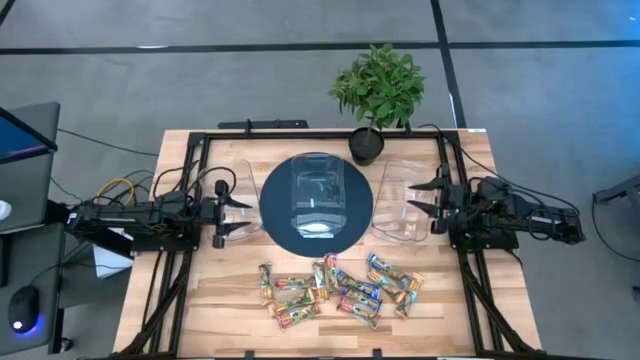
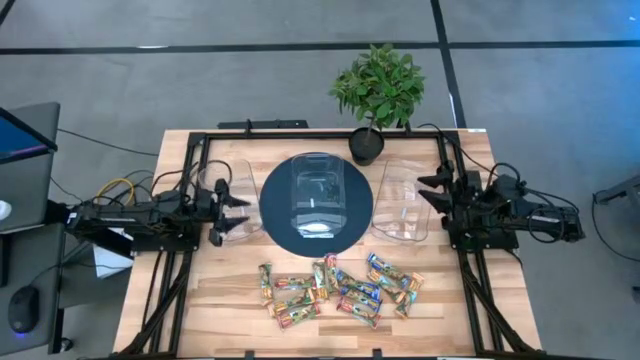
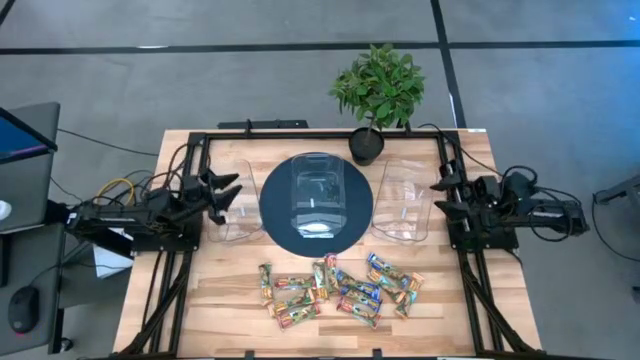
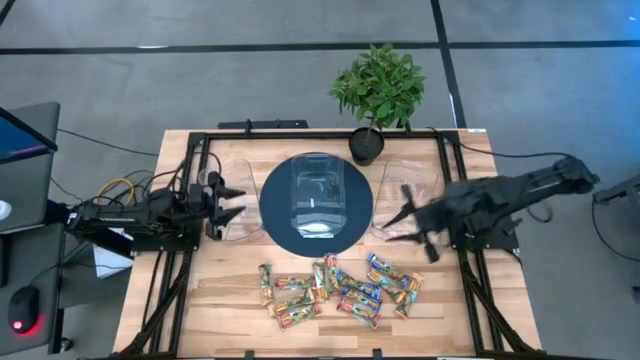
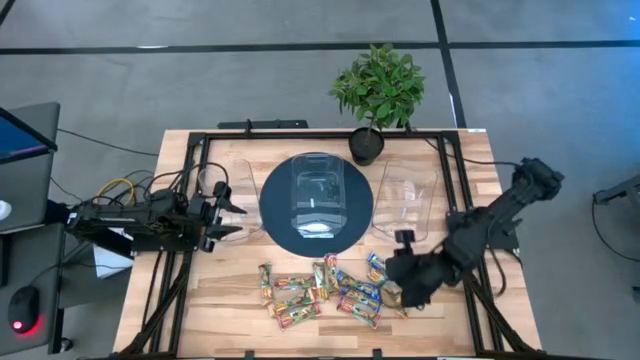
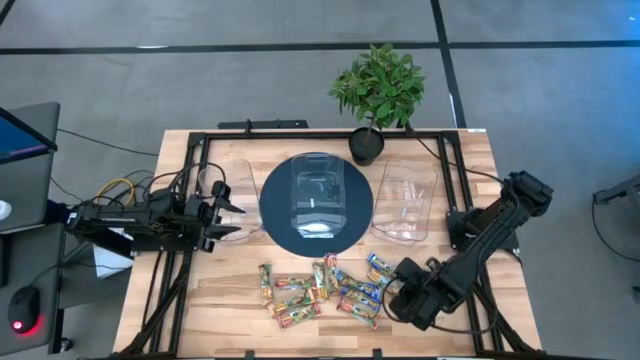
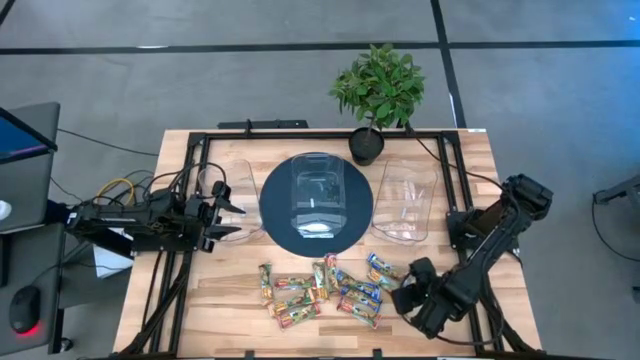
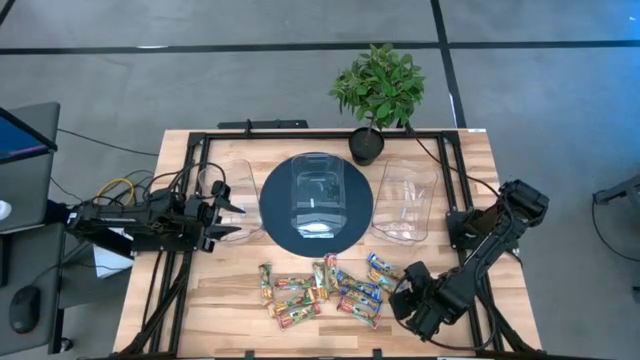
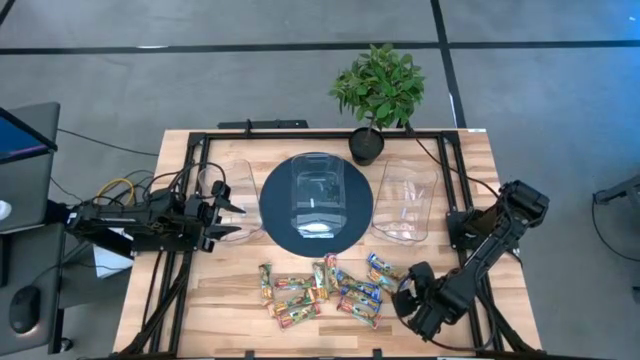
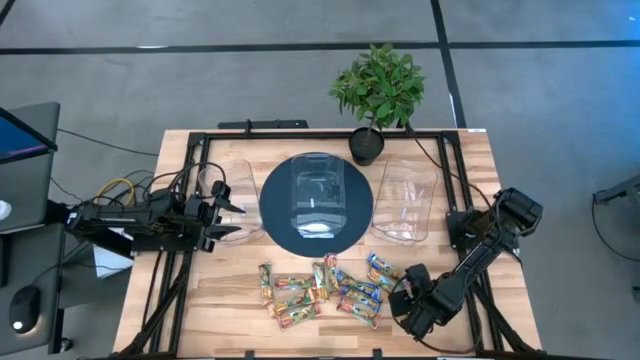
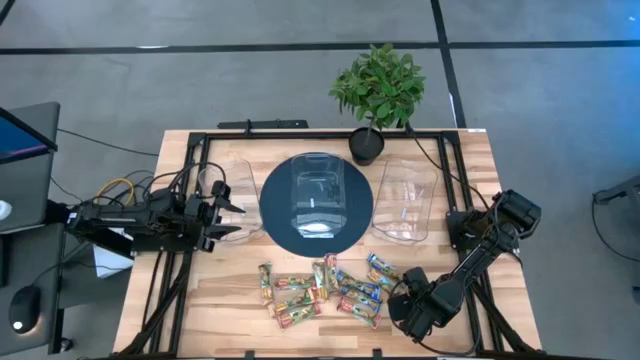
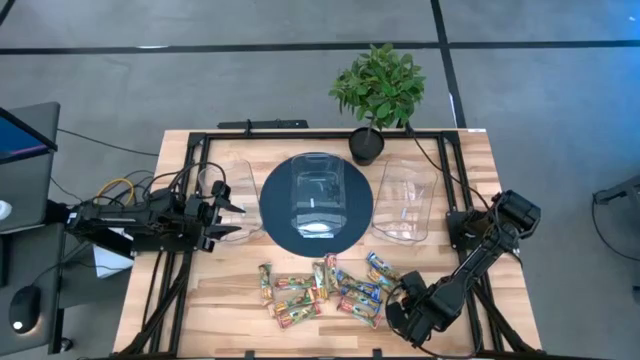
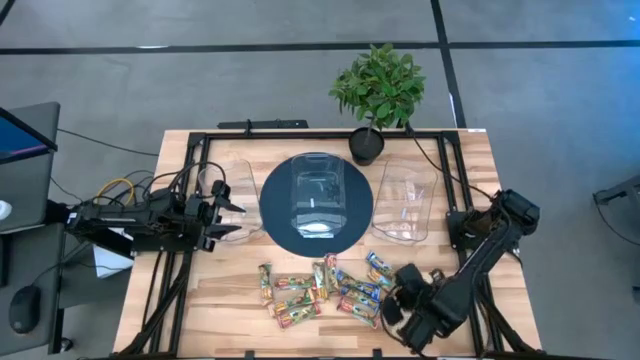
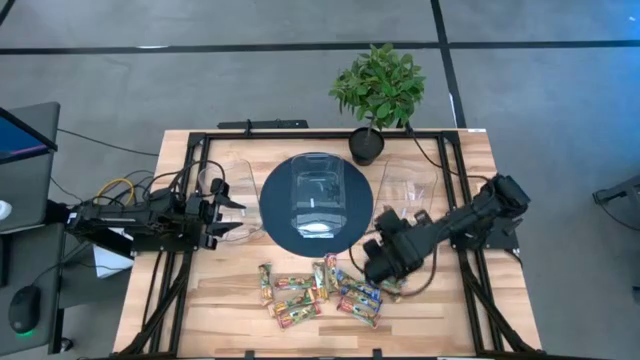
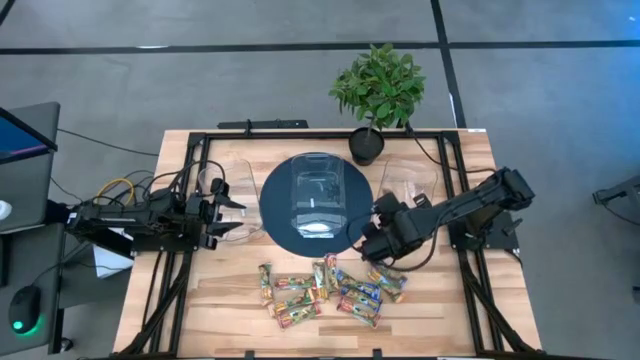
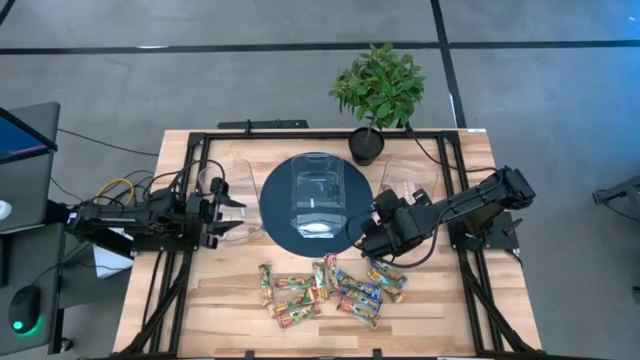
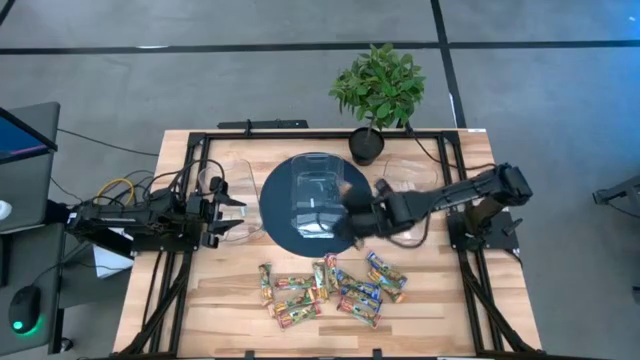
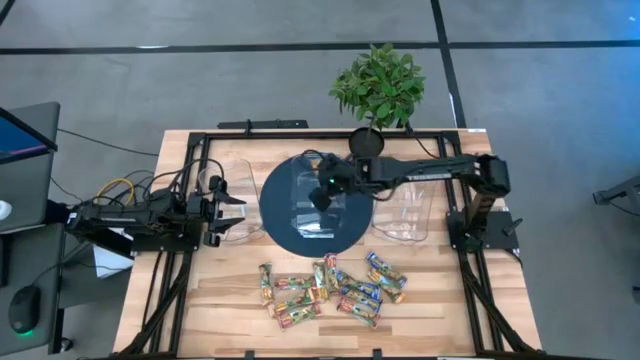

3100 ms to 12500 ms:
Task: Pick and place Granola Bars by type
Put the yellow granola bar into the middle transparent bin

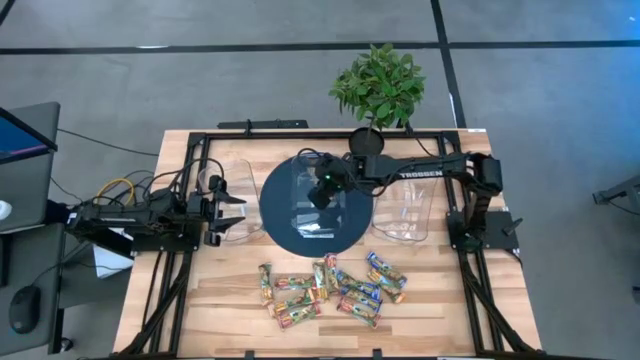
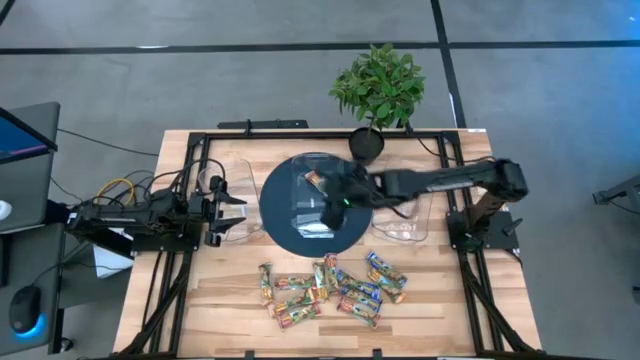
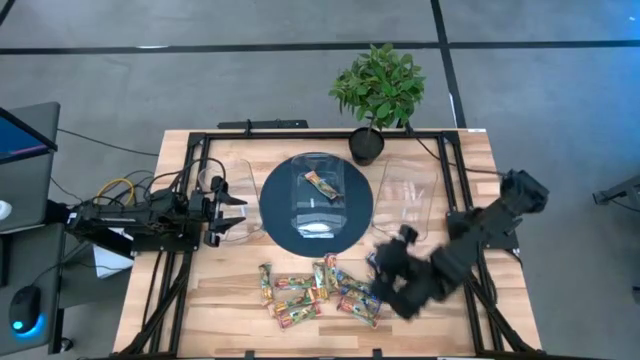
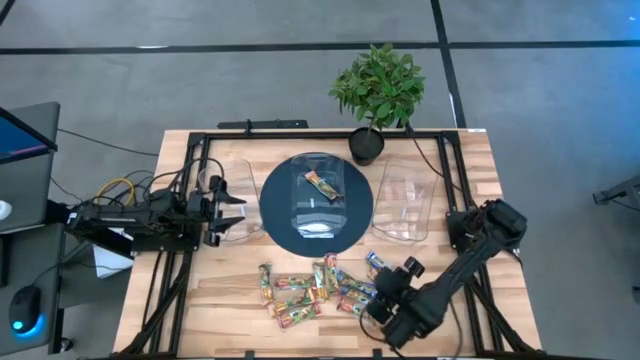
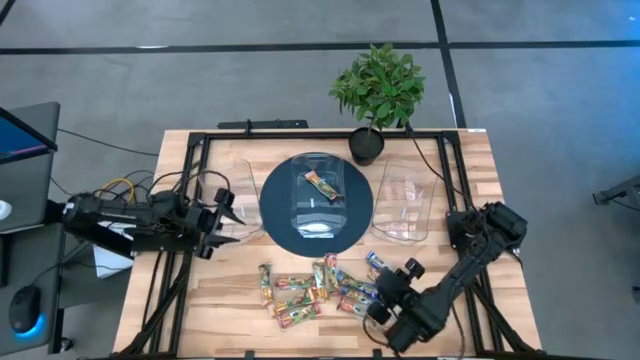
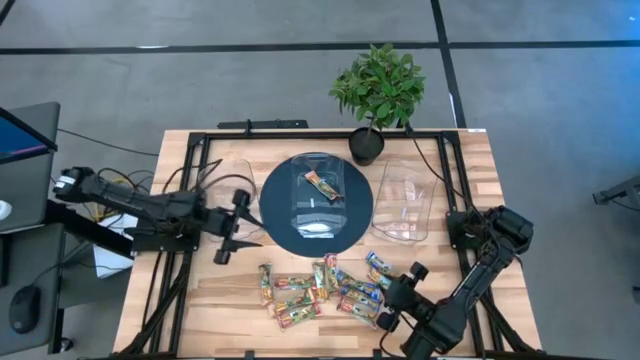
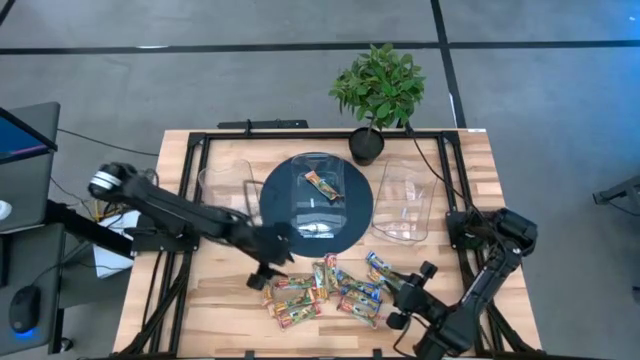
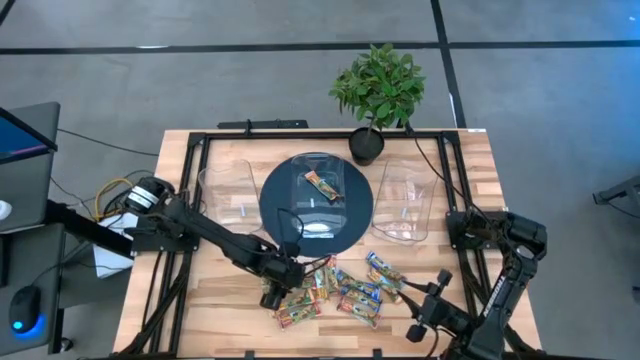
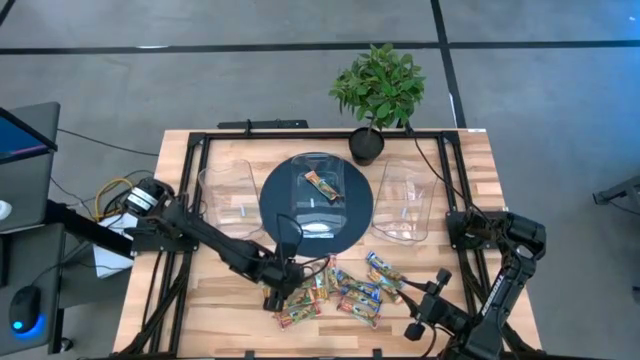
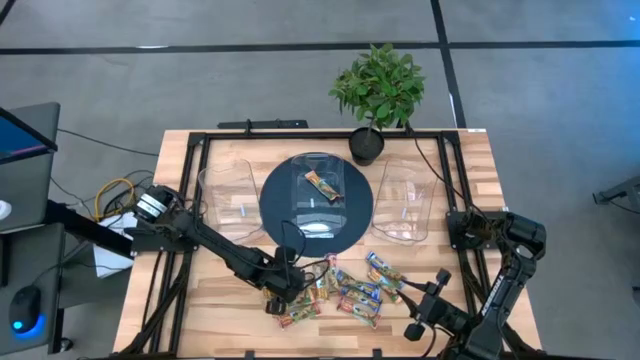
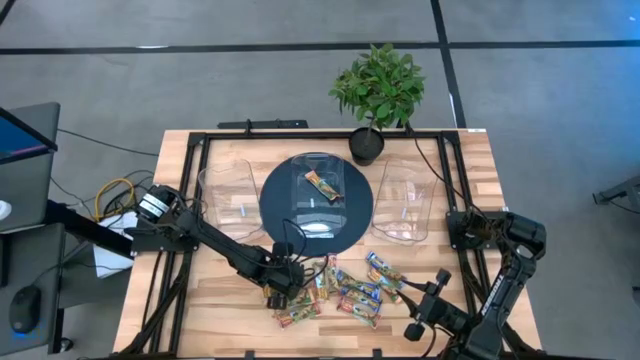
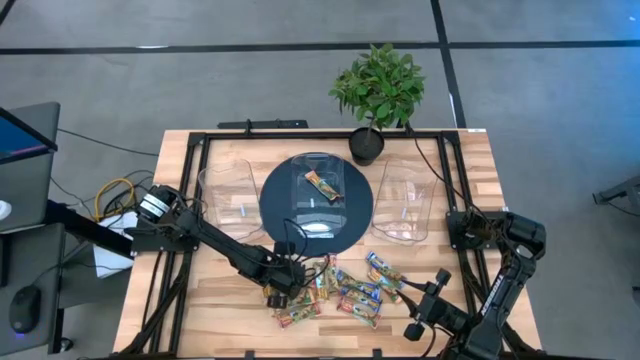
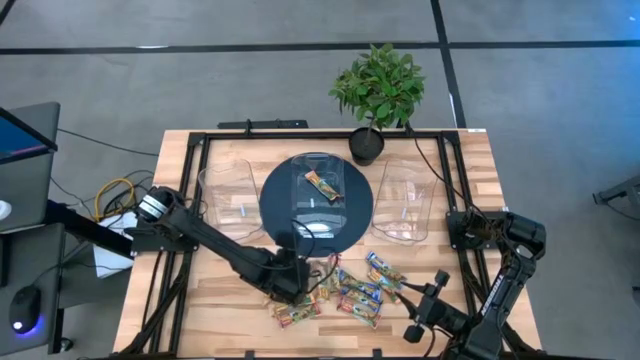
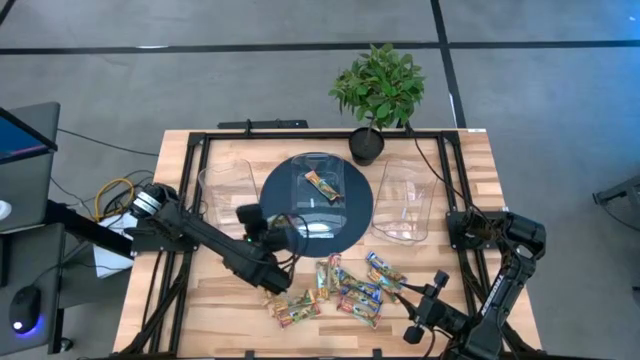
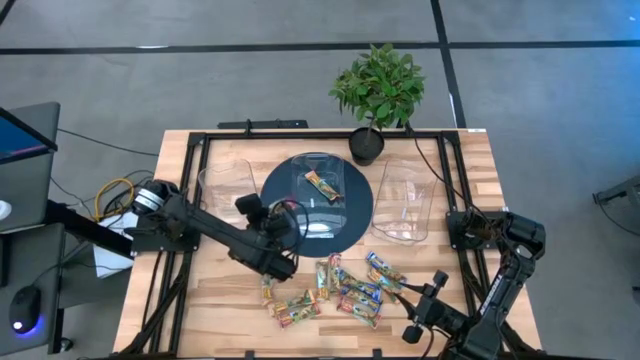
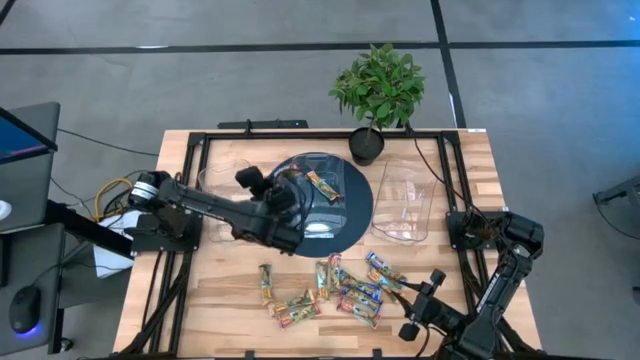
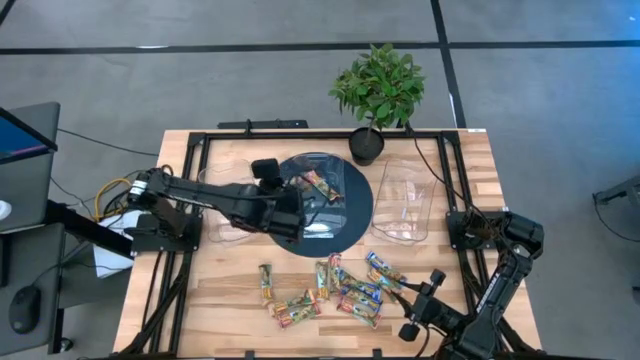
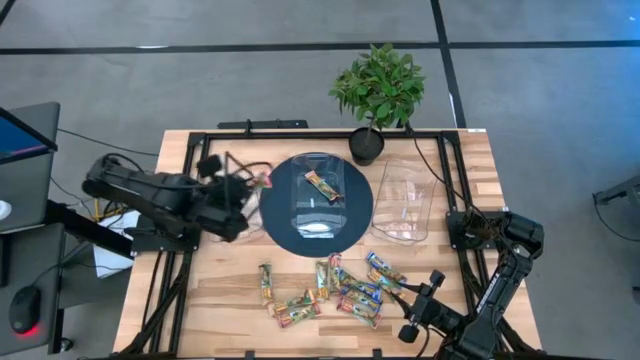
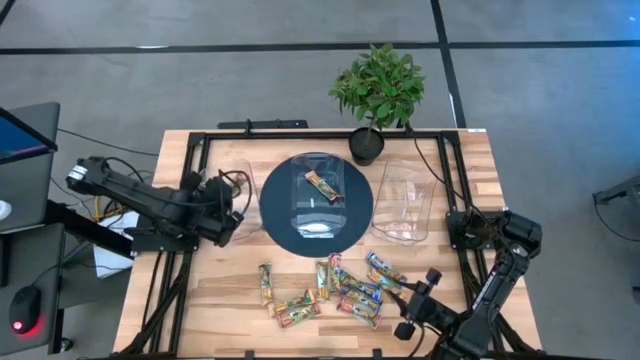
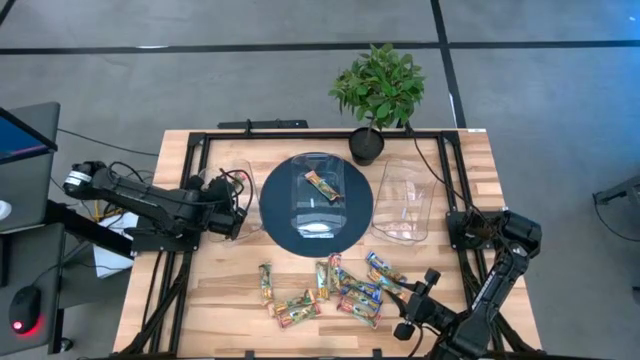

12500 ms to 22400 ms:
Put the red granola bar into the left transparent bin

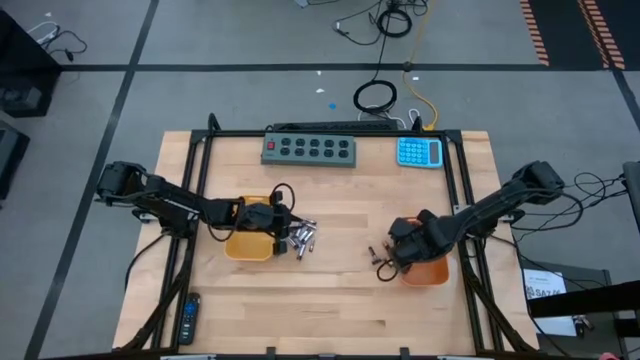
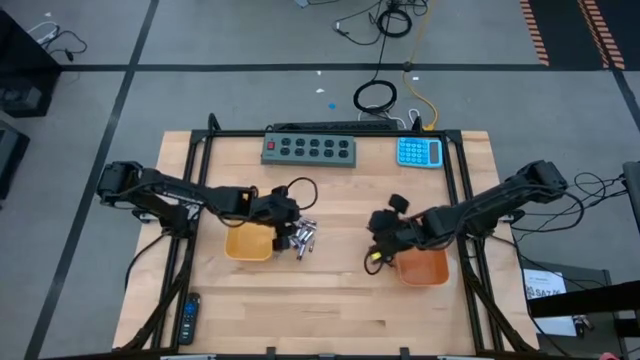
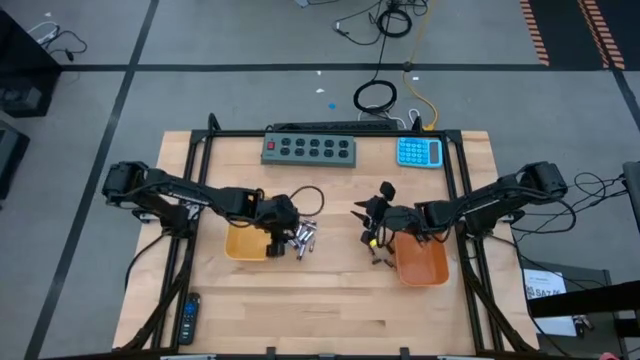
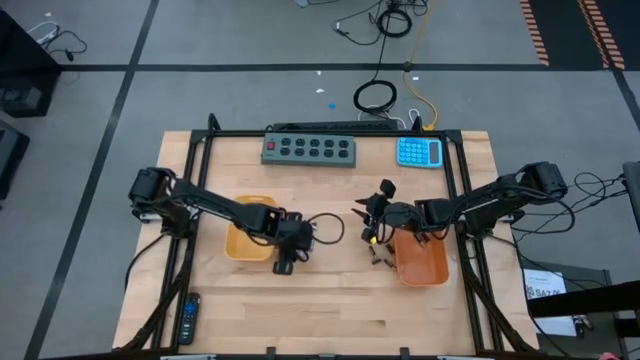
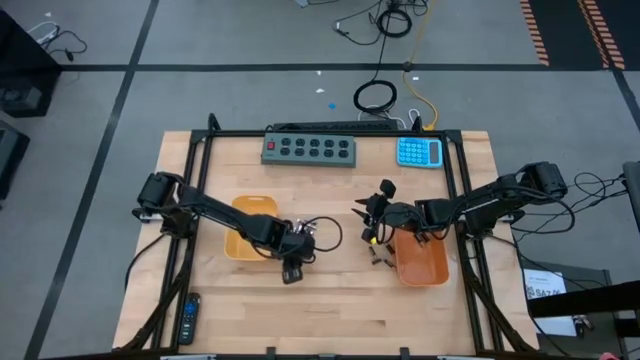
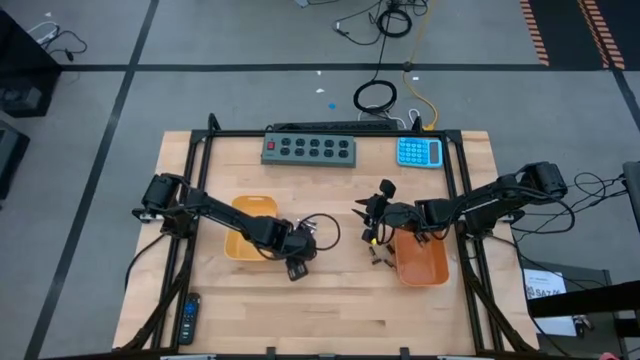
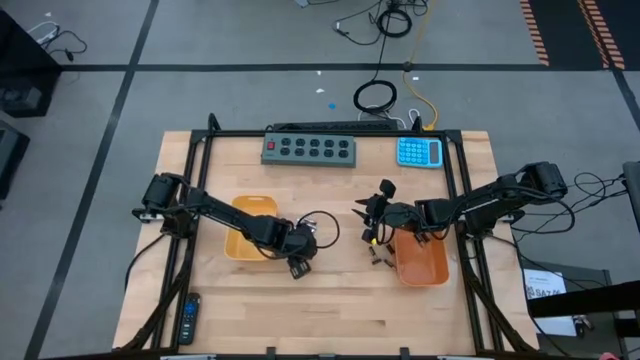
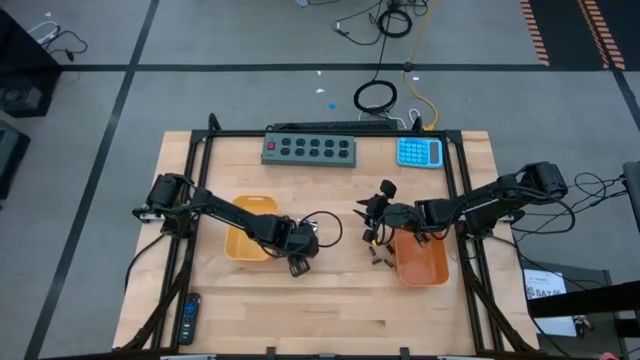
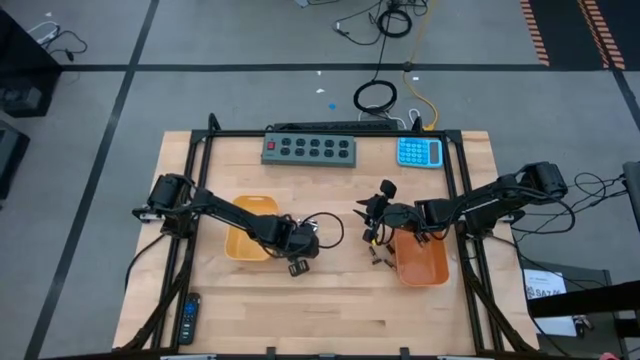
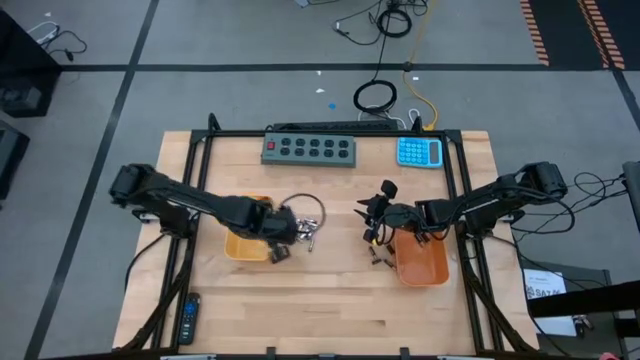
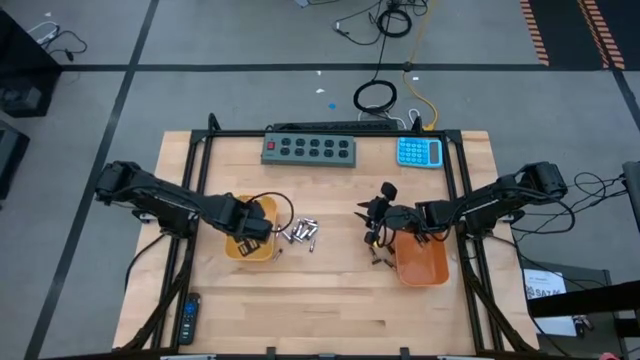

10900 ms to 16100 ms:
Task: Sort batteries
Put the silver battery into the yellow bin
